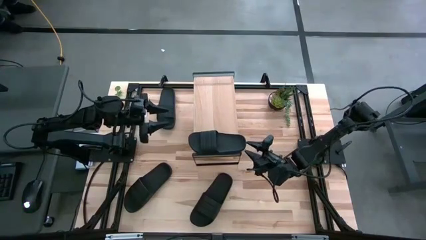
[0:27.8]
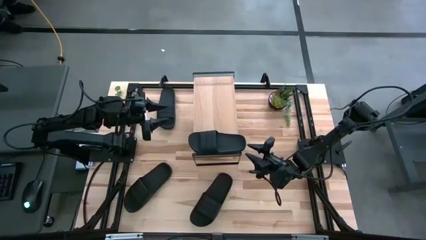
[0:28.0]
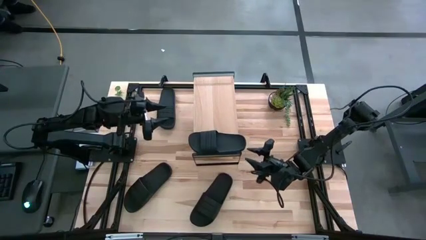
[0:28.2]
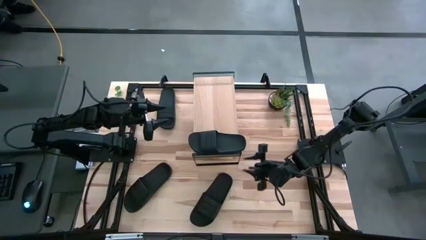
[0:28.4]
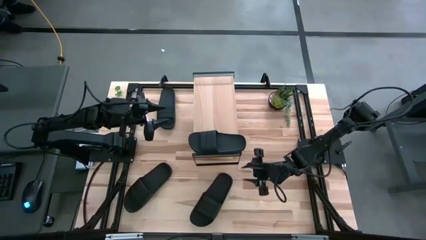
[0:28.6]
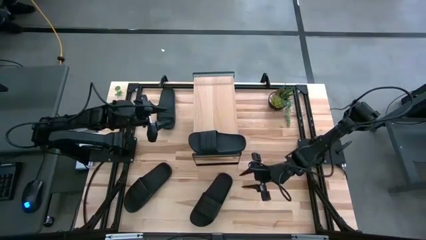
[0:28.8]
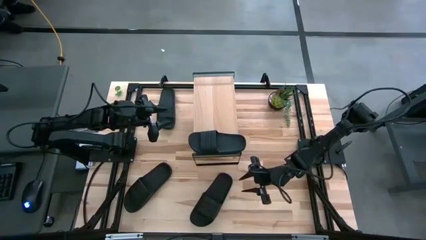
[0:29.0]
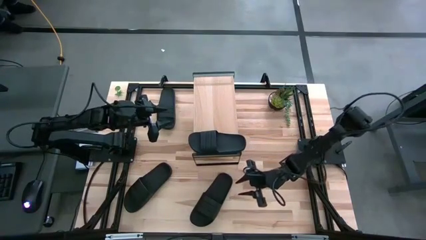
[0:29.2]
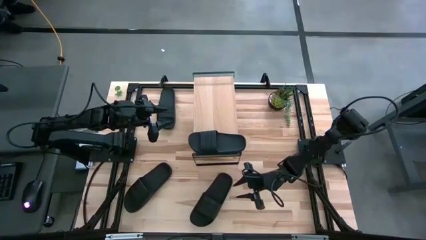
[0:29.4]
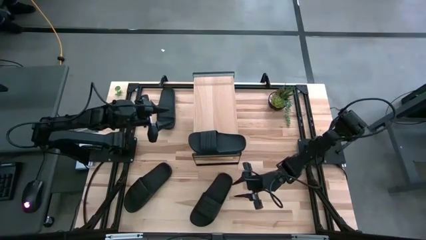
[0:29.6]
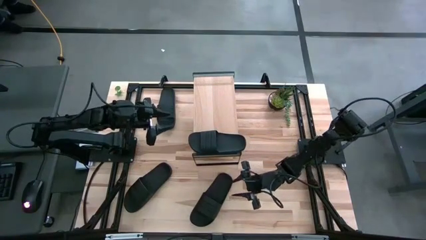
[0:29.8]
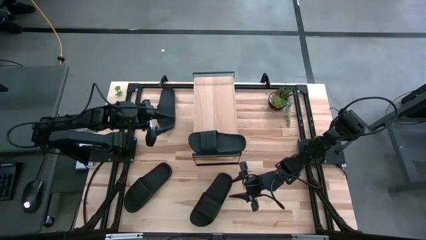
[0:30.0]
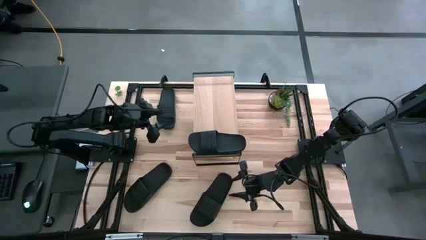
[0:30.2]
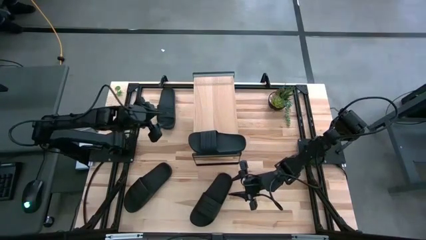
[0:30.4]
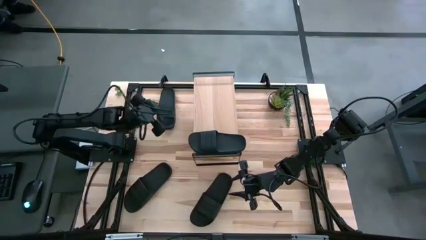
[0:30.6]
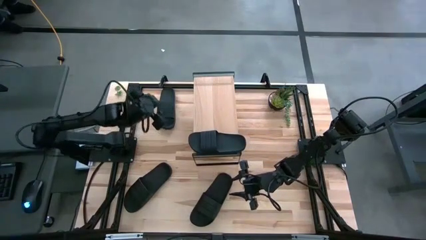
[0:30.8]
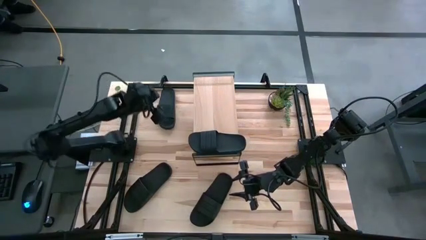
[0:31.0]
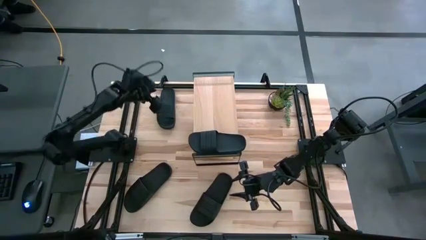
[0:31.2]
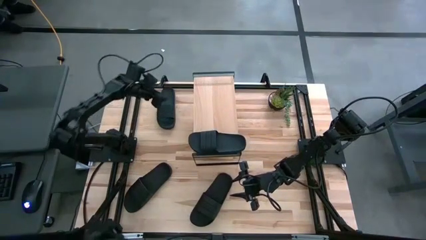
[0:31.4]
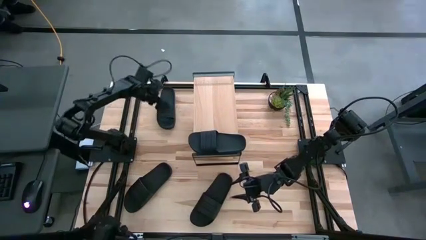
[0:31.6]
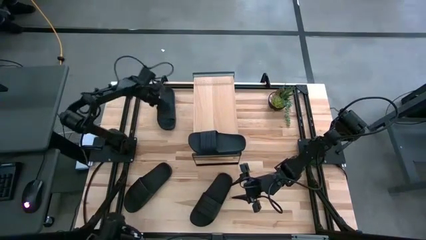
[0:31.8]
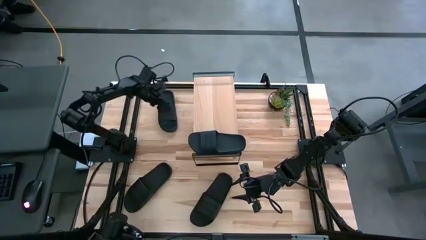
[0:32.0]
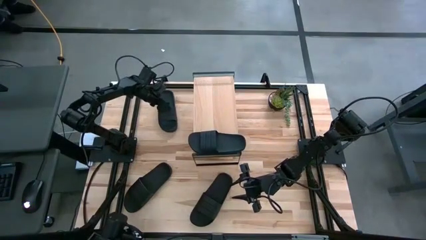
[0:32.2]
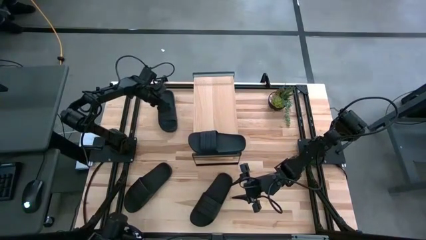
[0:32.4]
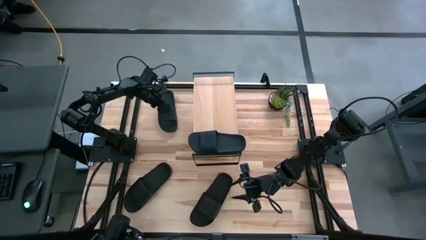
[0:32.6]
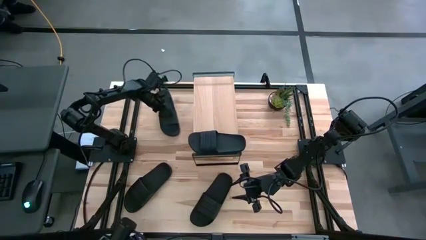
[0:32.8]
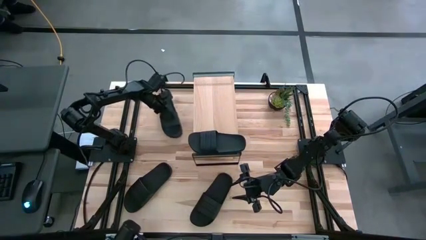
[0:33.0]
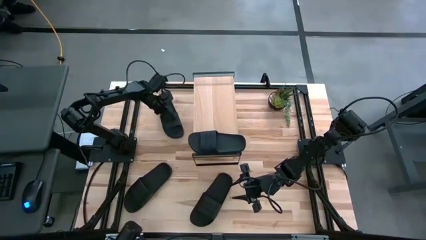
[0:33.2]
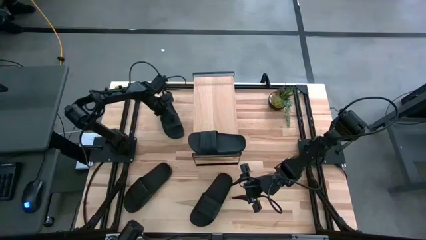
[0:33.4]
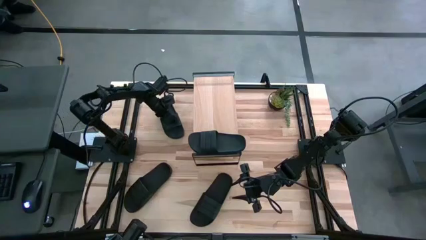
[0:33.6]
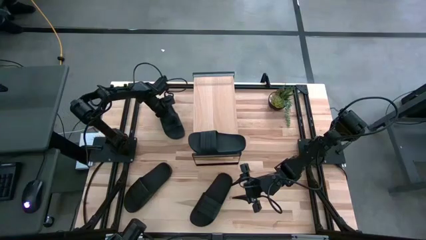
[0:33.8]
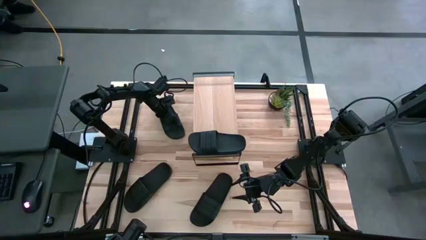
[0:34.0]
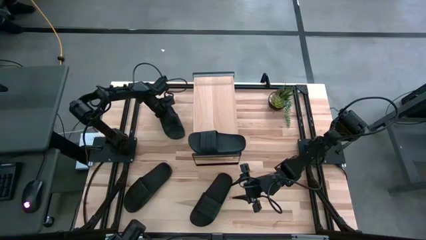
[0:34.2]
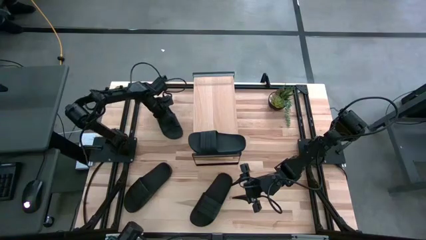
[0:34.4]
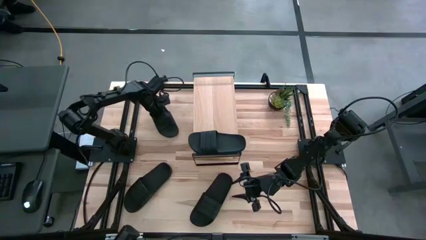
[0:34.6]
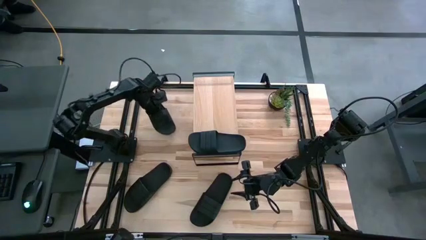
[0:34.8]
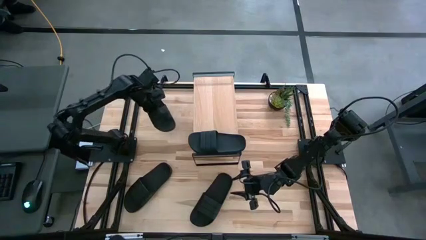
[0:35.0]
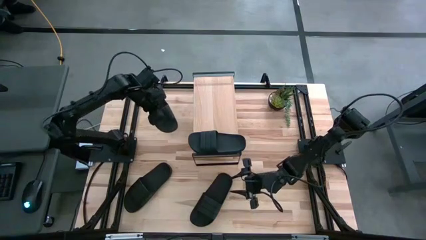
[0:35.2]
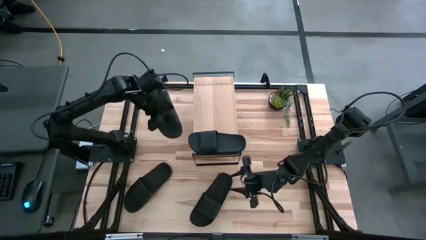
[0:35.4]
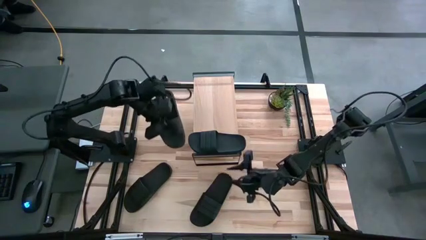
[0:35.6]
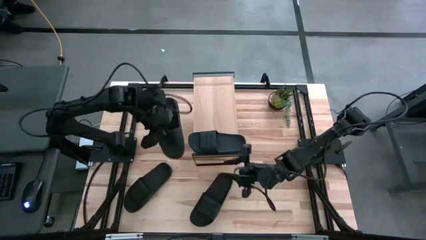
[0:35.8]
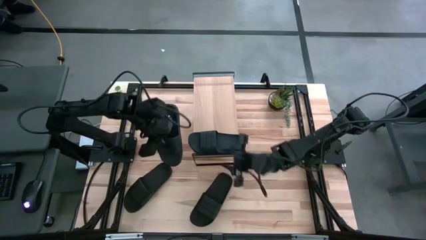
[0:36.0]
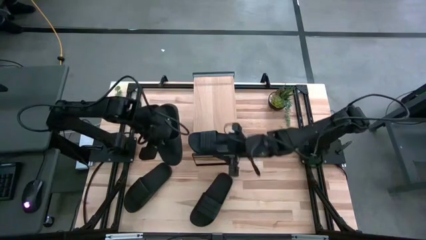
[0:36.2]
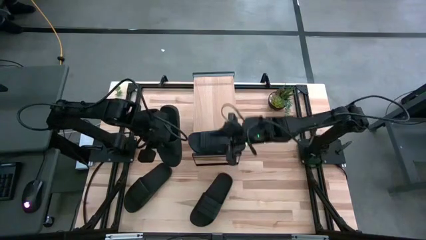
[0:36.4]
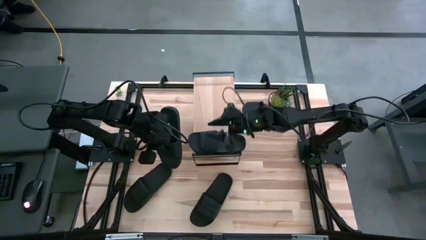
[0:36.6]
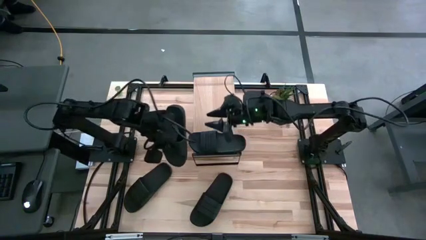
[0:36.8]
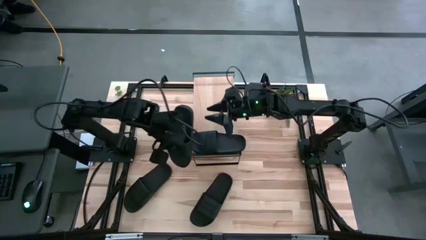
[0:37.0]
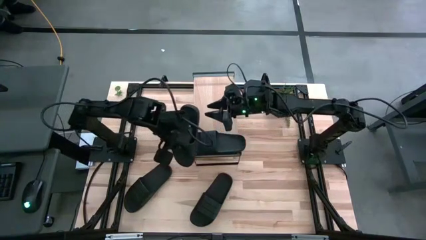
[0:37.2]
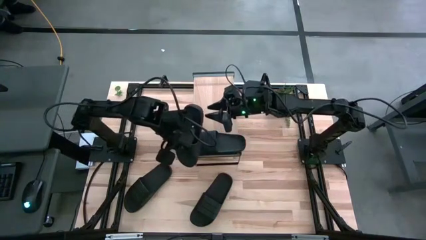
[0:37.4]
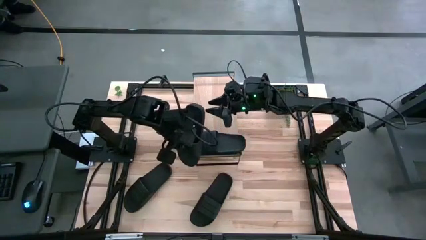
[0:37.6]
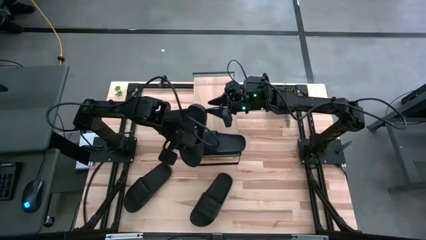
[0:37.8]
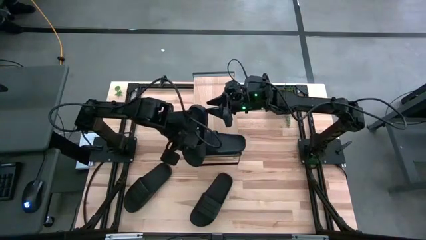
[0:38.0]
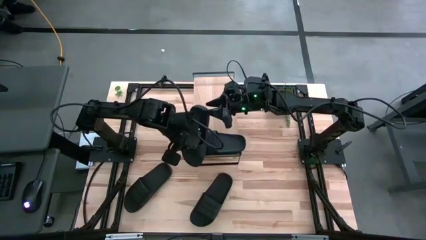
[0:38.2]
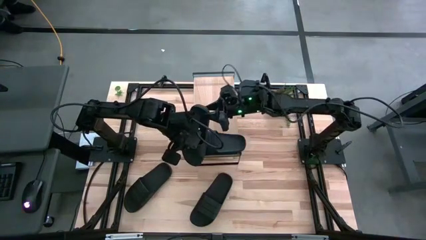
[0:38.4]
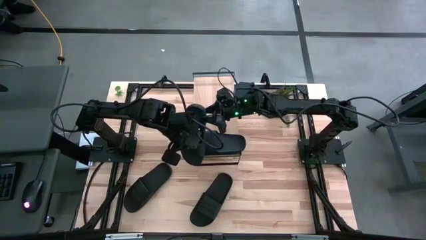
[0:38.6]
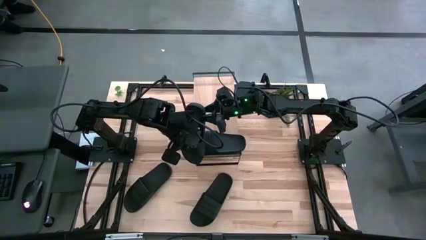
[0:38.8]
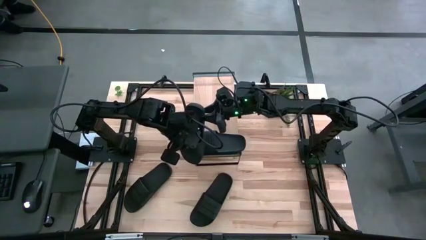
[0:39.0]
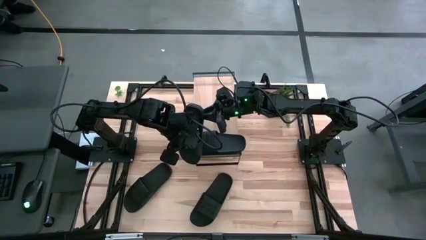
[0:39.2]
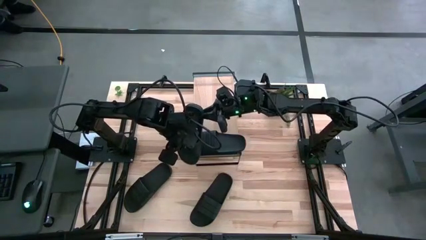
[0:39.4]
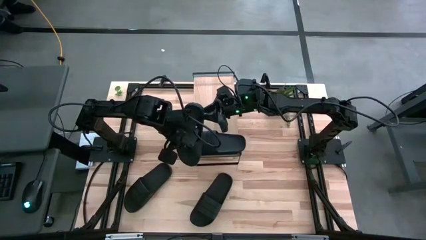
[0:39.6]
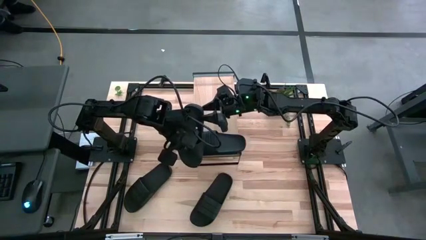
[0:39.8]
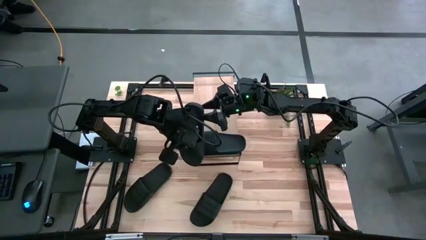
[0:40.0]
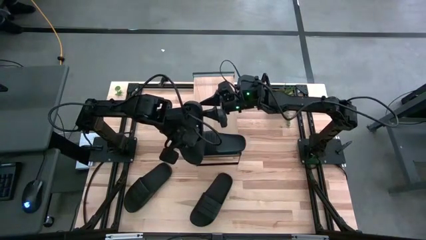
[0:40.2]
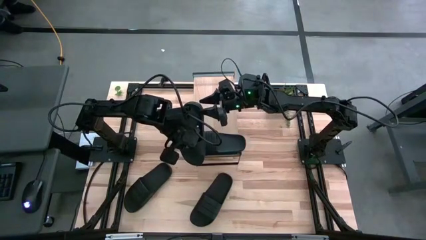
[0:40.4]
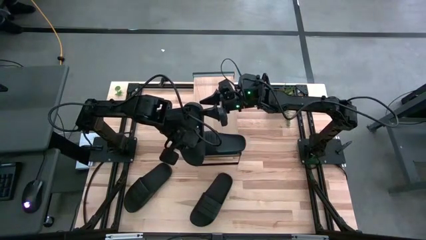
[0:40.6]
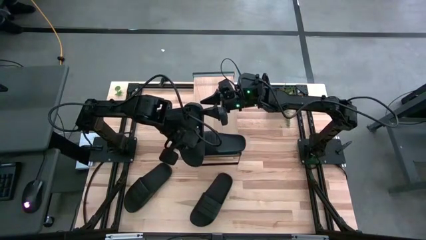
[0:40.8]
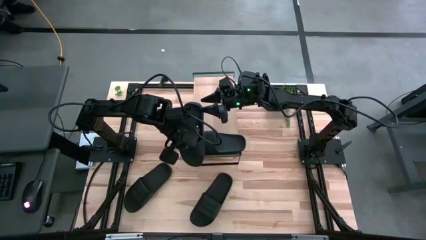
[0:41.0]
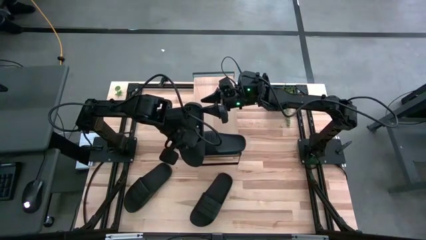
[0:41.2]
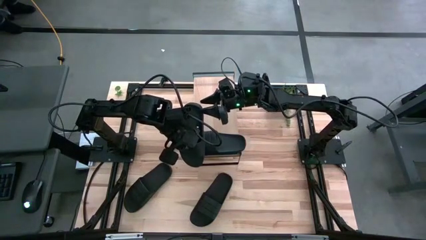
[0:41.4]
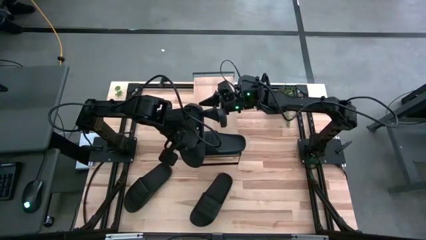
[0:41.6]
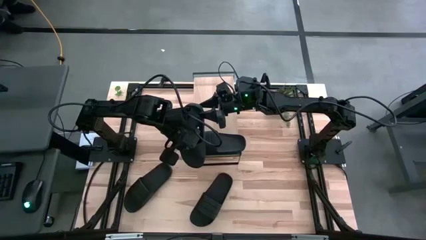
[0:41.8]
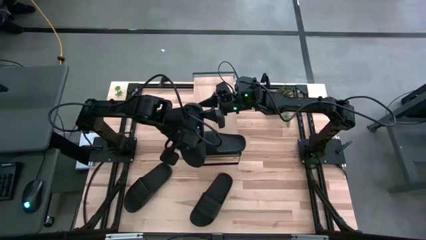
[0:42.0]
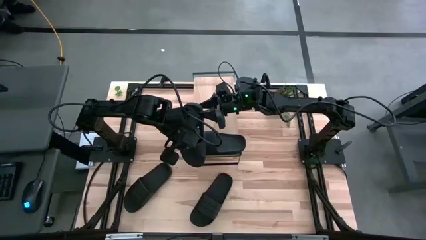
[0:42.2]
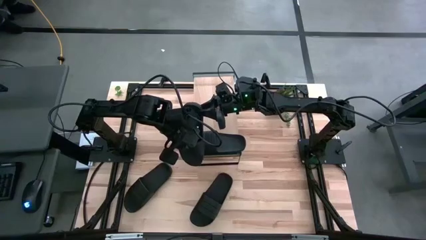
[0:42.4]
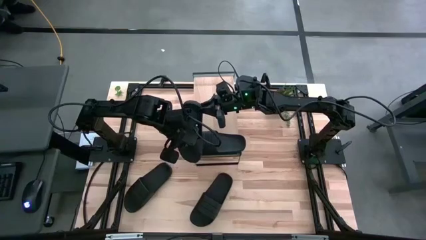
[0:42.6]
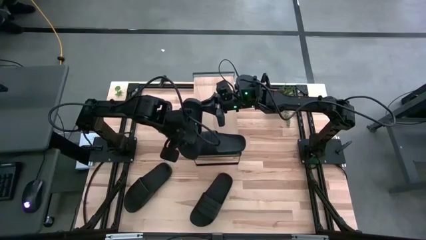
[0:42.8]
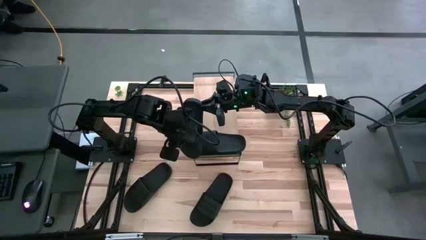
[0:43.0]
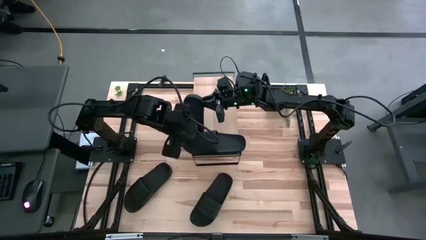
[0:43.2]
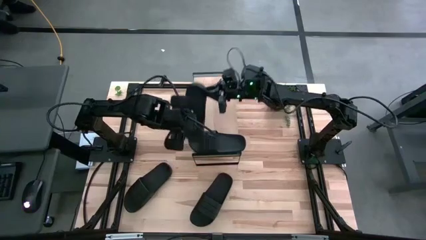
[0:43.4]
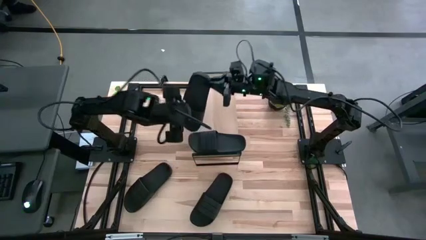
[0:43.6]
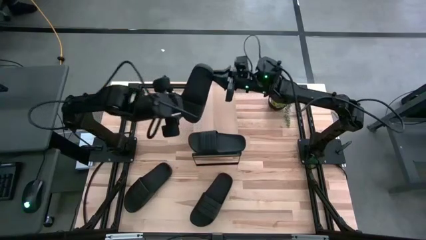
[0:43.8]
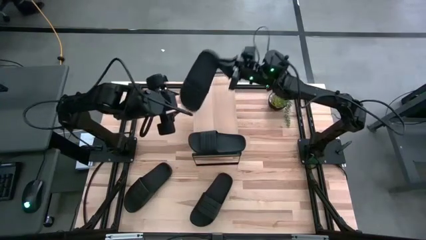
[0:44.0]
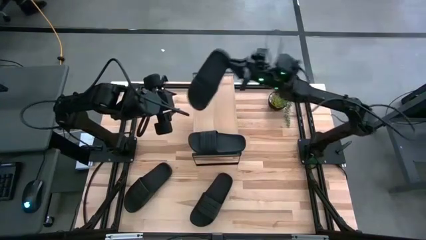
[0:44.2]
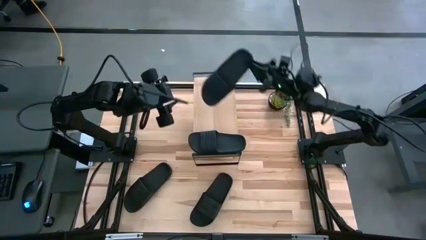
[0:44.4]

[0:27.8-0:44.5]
Task: Pick and place slides into the shelf
Put the top left slipper on the shelf
